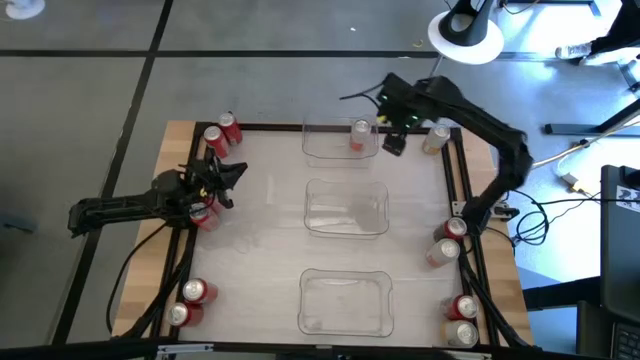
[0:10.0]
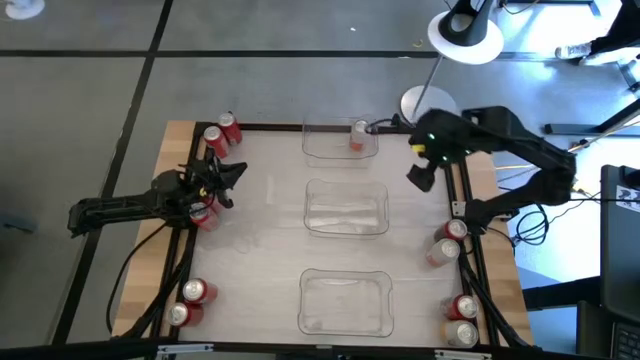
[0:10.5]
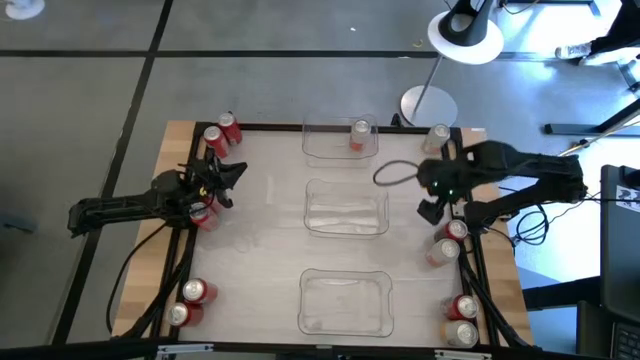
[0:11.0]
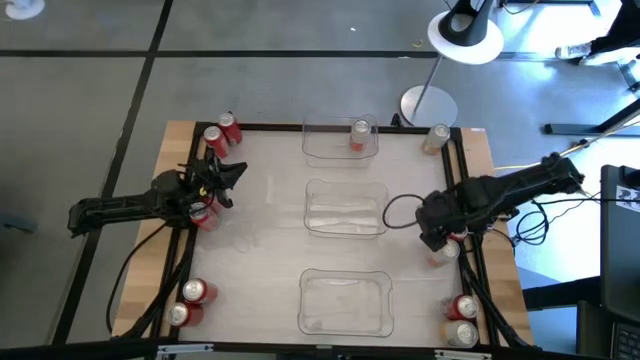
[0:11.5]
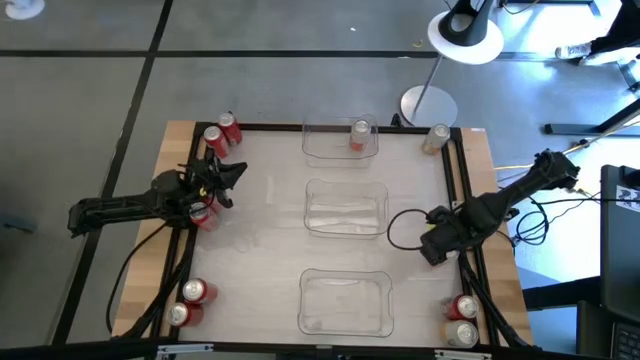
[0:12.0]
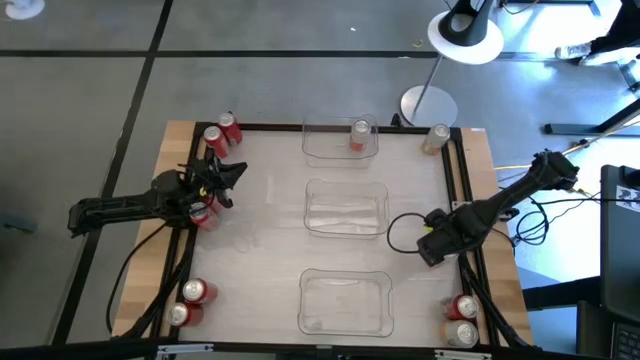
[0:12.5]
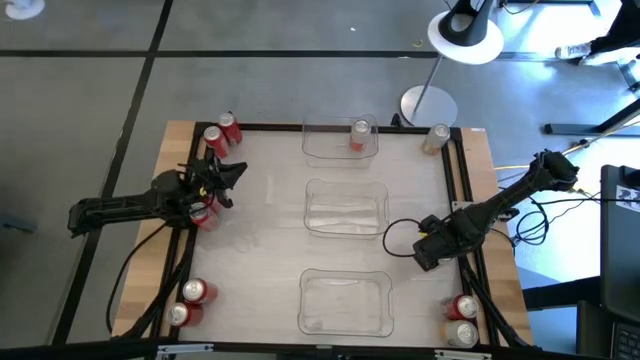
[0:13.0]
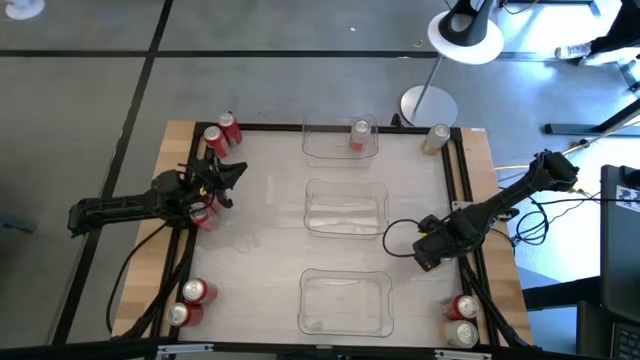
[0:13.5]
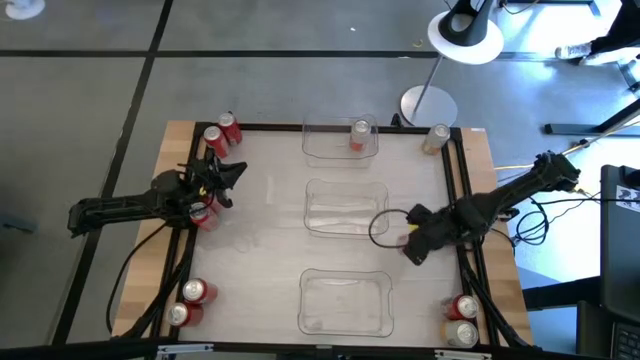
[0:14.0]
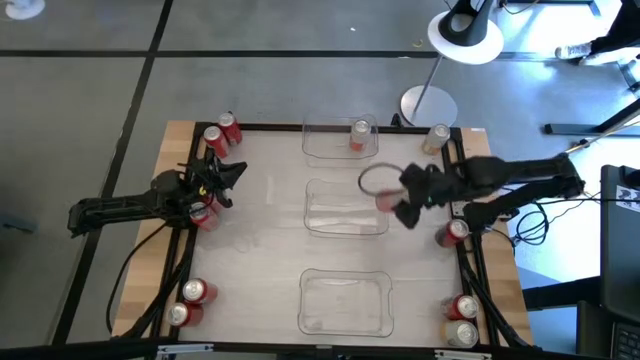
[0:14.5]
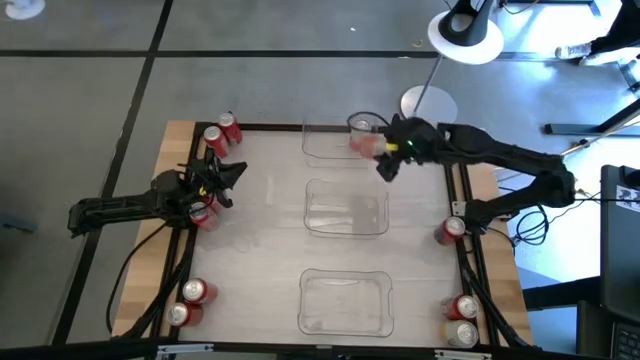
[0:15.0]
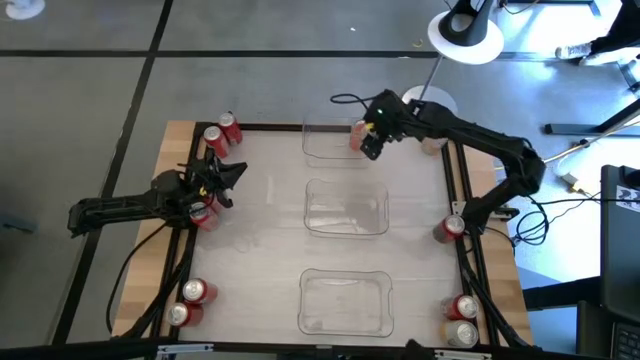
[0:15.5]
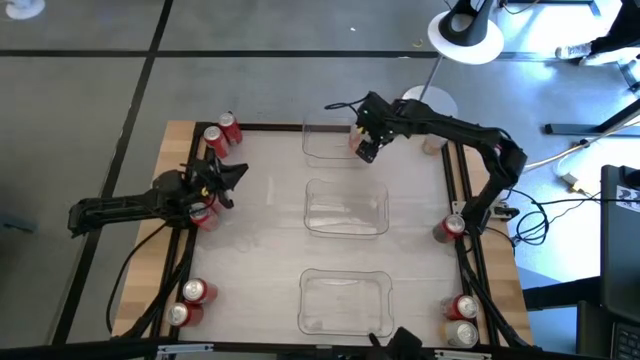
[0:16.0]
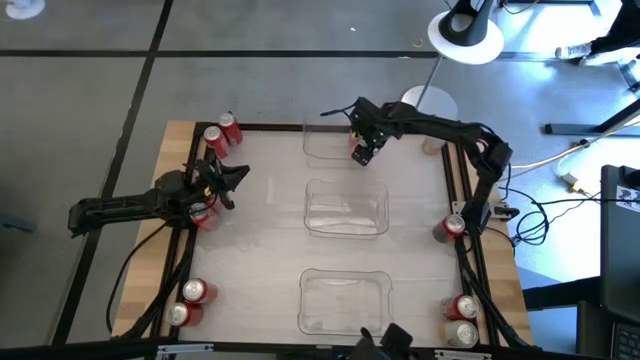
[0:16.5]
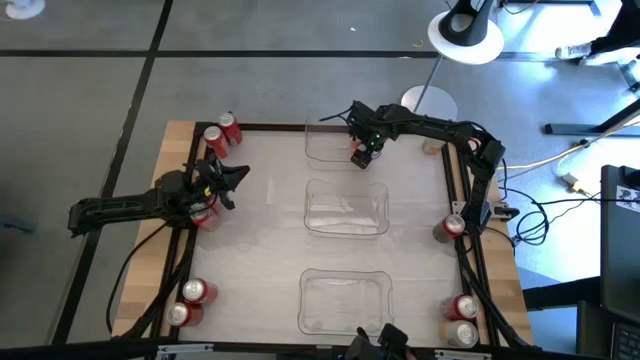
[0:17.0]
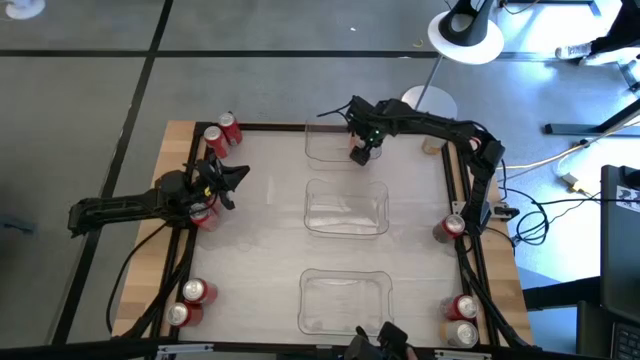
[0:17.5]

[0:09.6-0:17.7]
Task: Sort soda cans
Put the orange white soda can into the top transparent bin

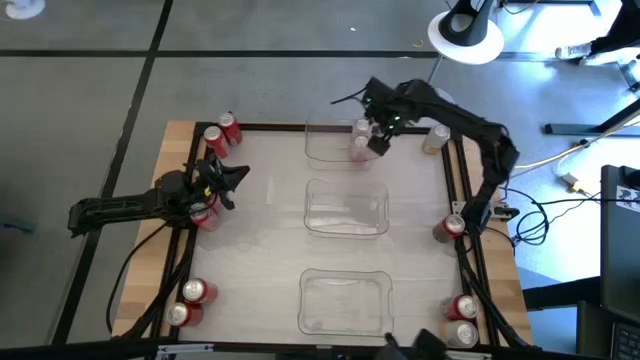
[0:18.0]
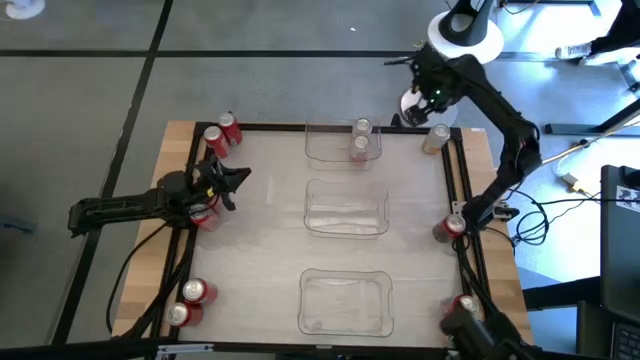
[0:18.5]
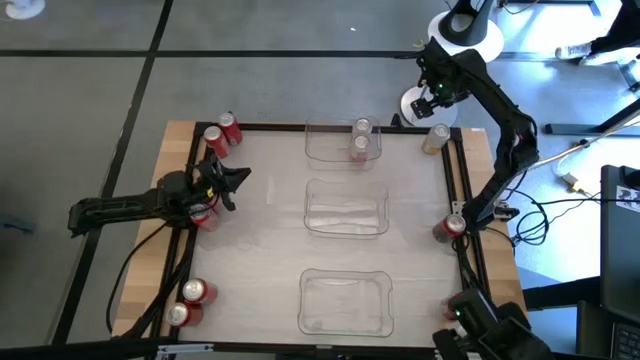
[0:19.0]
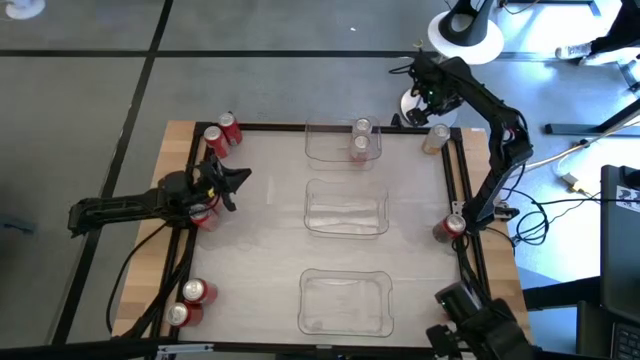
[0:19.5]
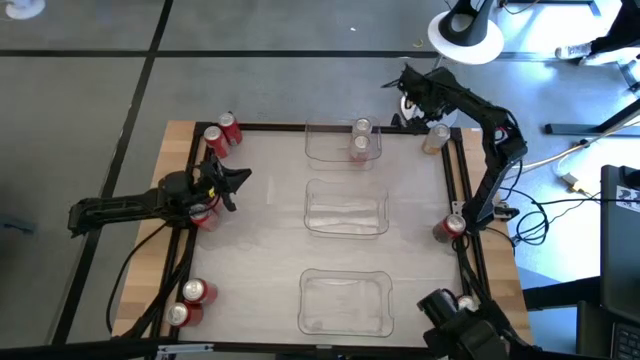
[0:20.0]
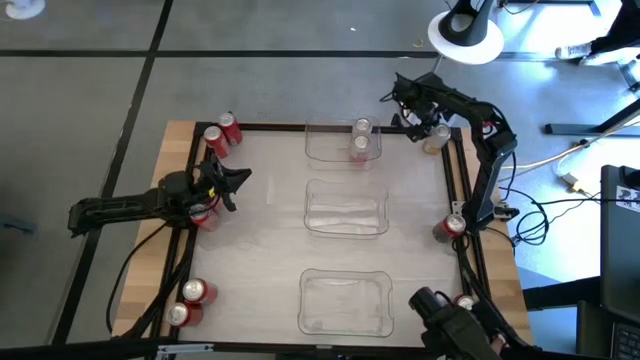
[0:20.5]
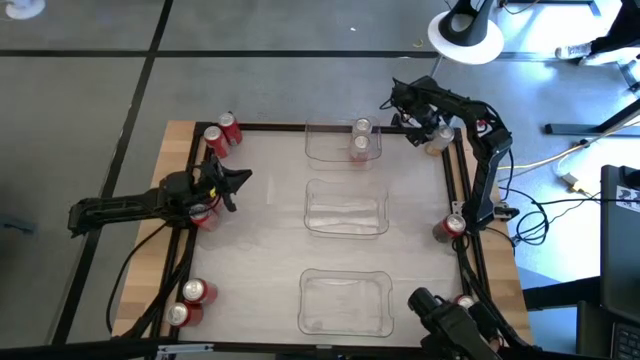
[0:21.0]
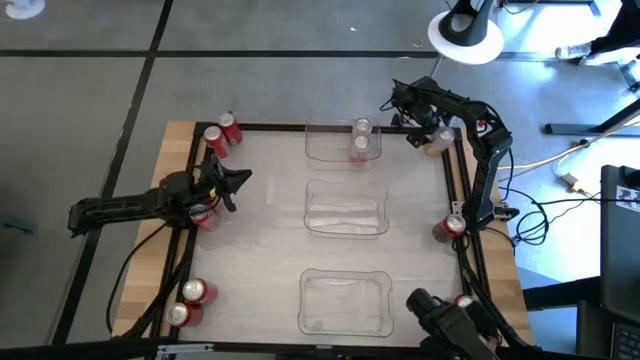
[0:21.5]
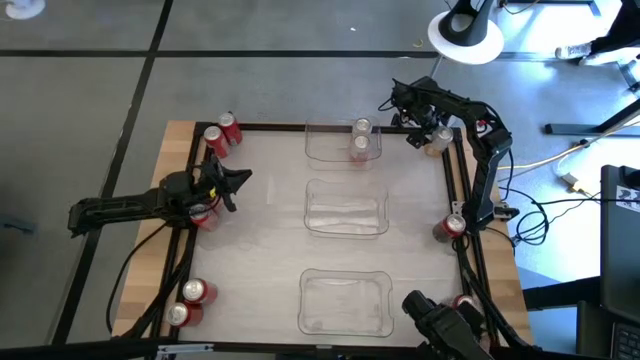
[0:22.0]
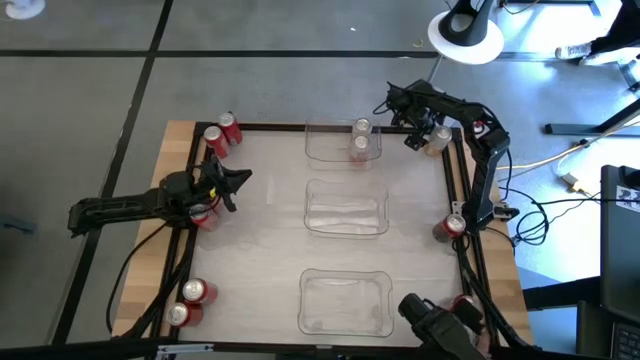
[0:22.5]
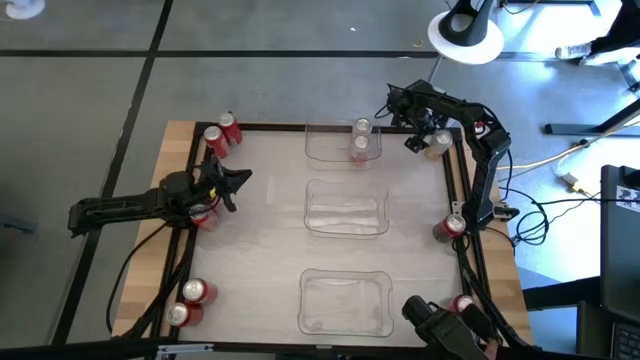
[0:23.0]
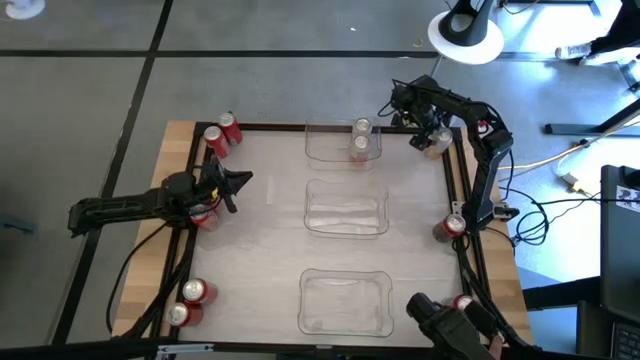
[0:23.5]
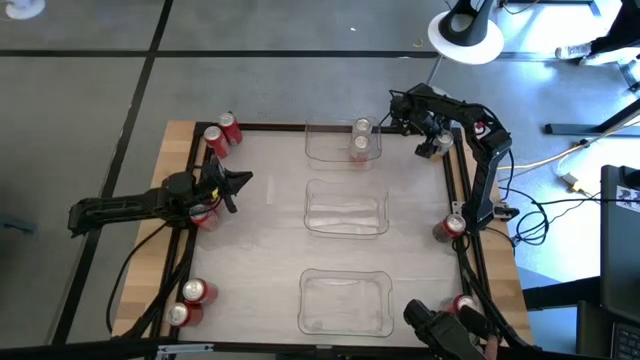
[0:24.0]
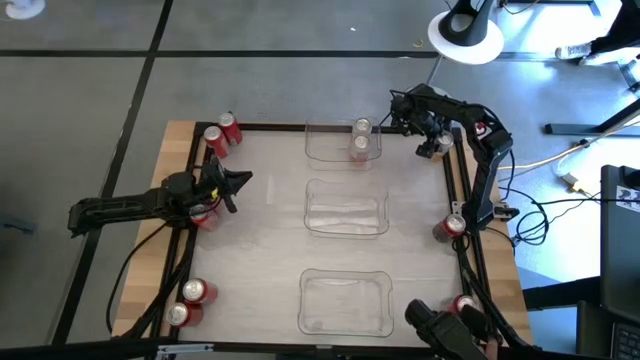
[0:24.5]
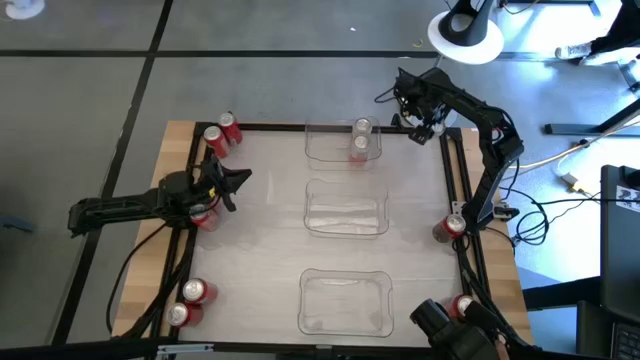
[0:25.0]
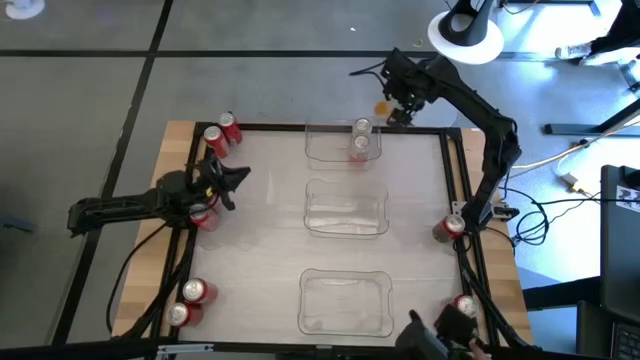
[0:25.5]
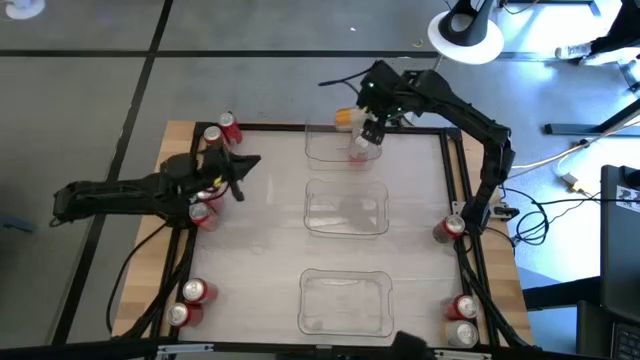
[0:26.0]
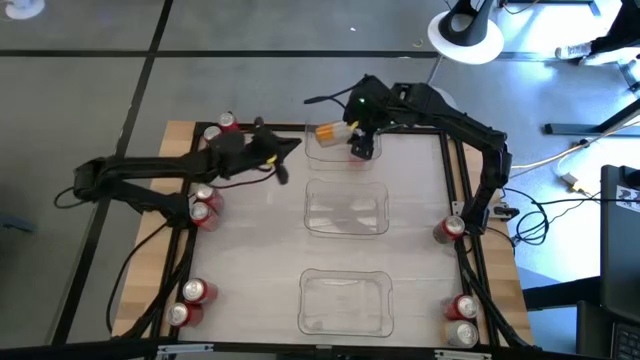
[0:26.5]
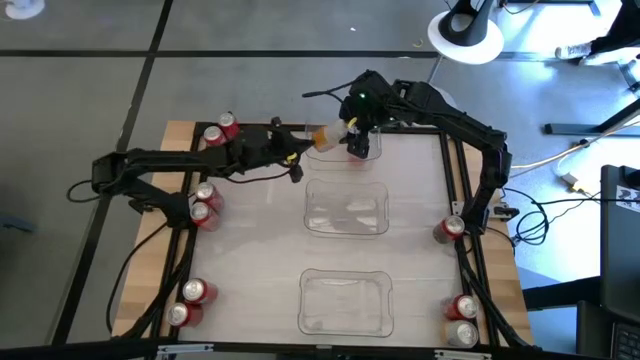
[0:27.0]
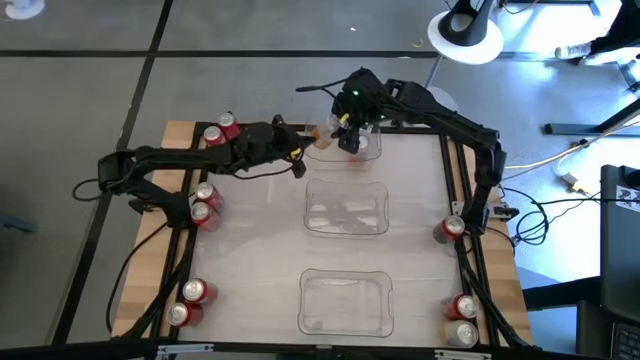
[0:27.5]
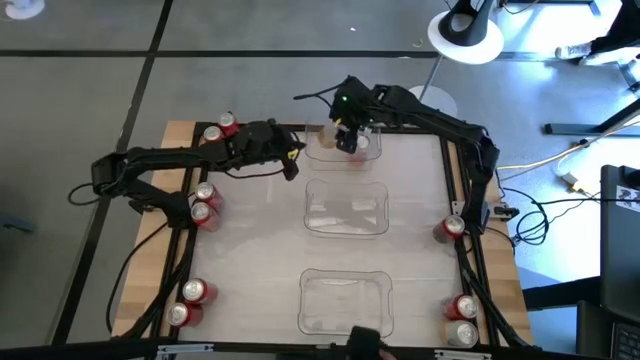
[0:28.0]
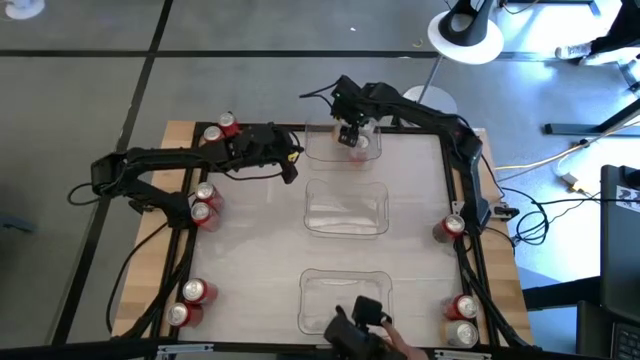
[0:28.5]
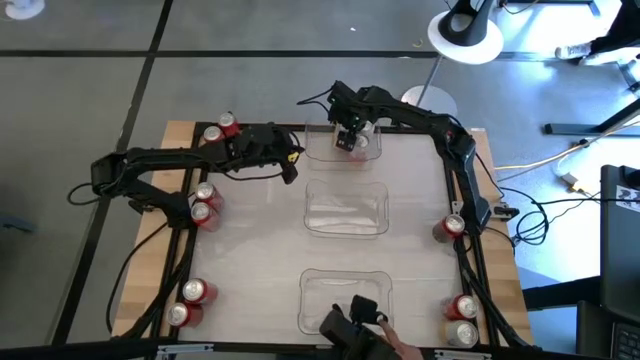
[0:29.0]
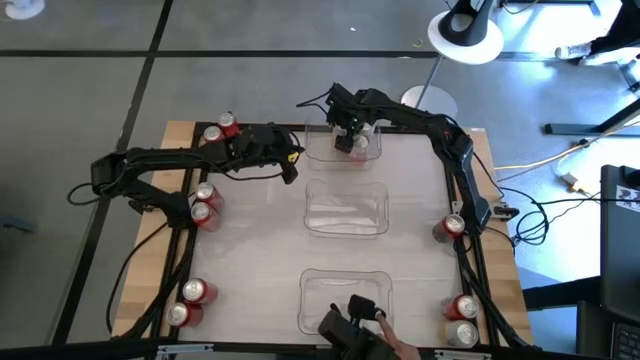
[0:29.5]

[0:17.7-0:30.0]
Put the top yellow white soda can into the top transparent bin

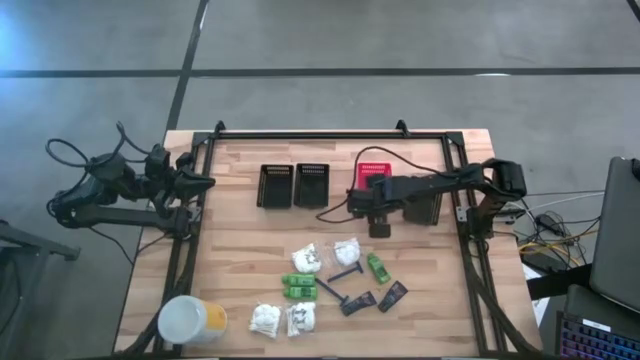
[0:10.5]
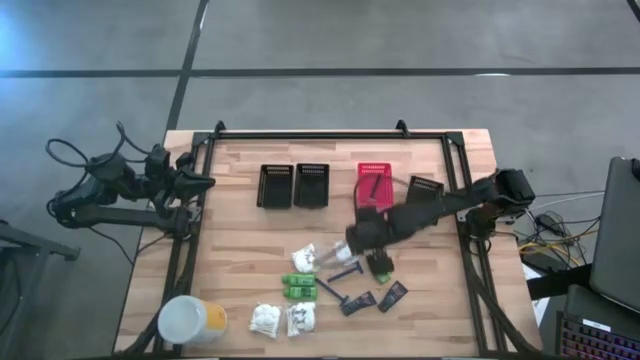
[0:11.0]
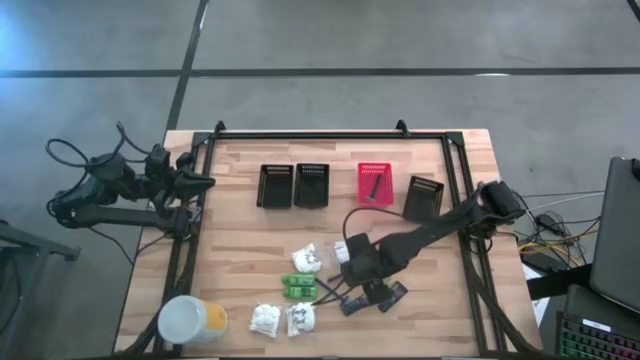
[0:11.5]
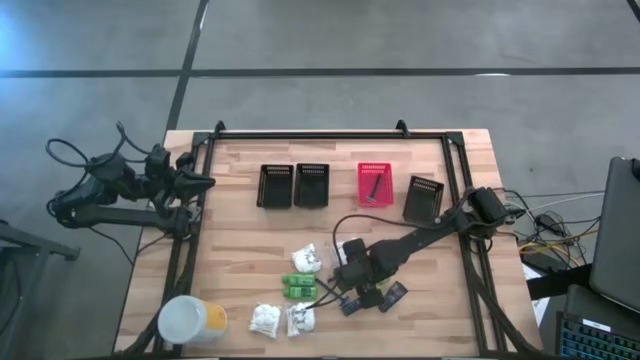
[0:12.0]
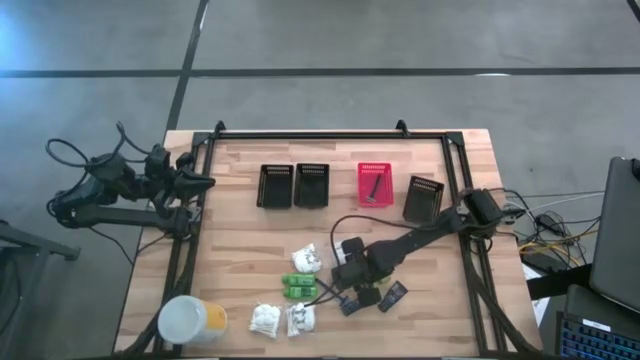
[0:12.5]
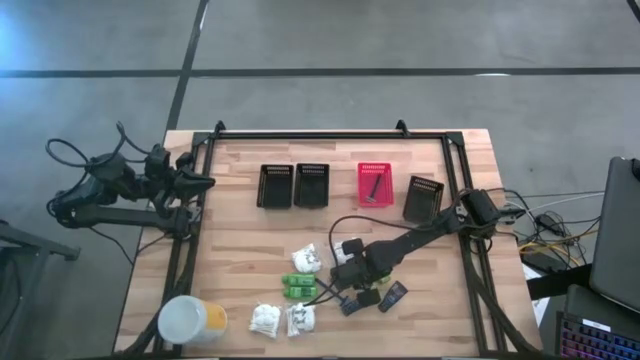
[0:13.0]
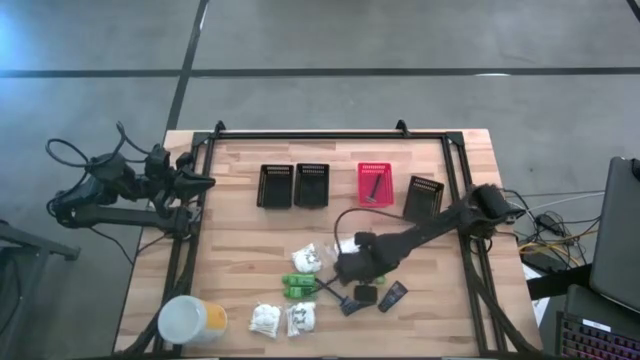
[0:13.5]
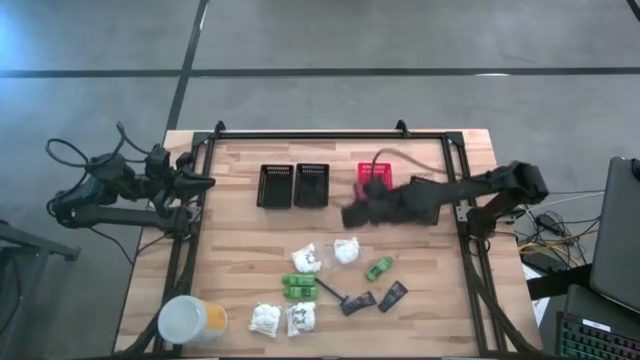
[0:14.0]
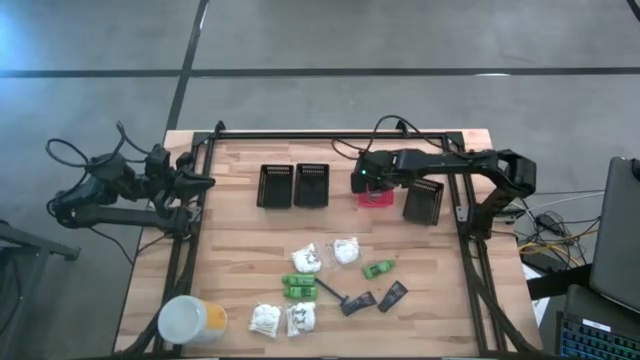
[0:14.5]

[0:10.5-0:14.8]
Task: Pick & Place Travel size toiletries
Put the blue razor into the red bin
